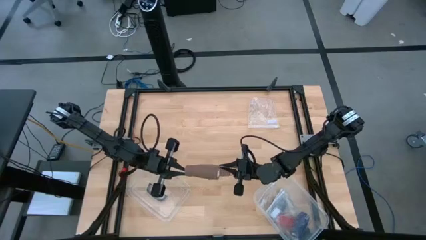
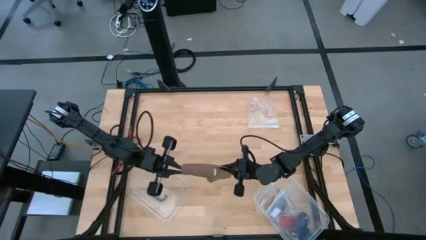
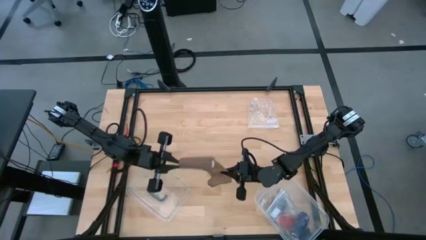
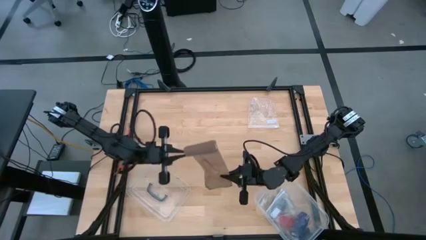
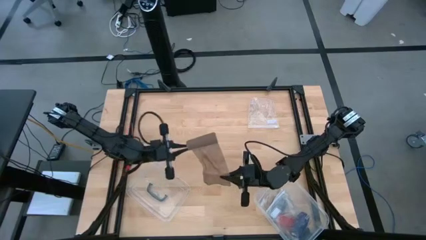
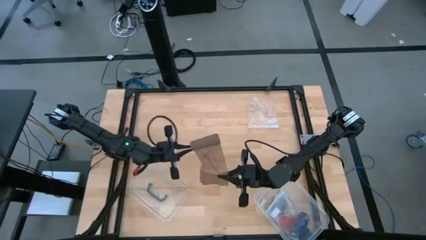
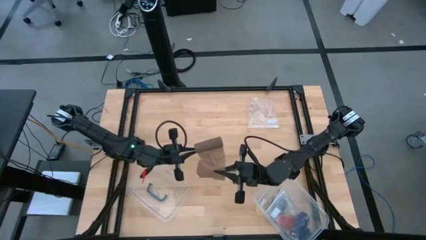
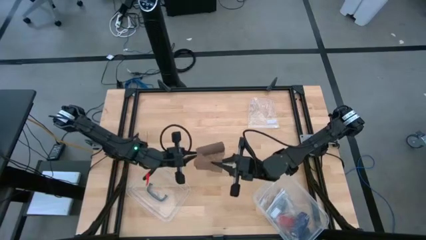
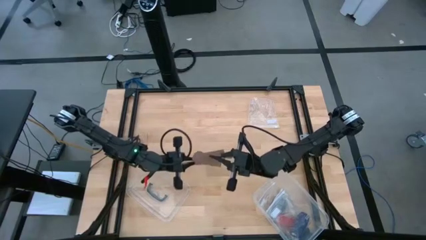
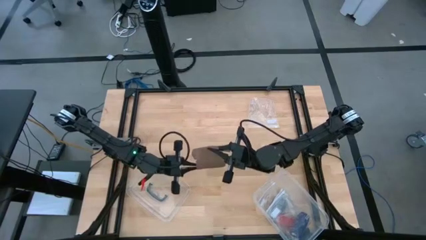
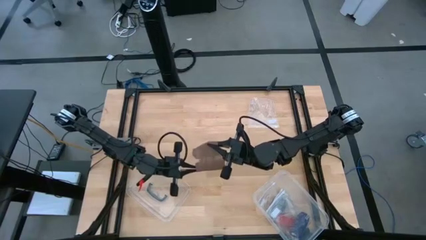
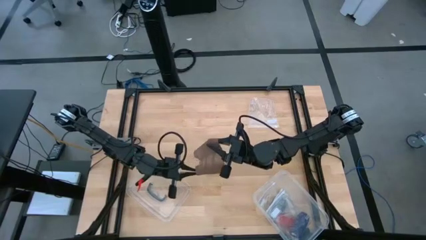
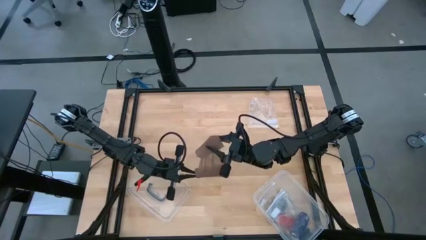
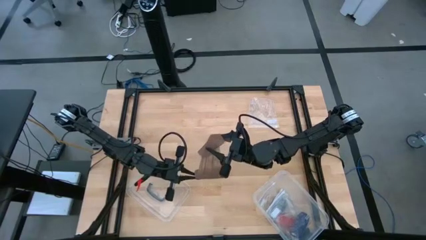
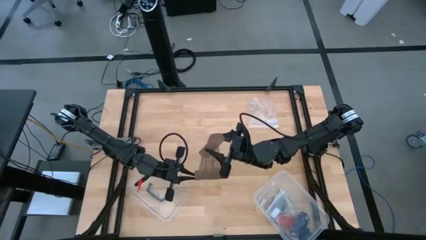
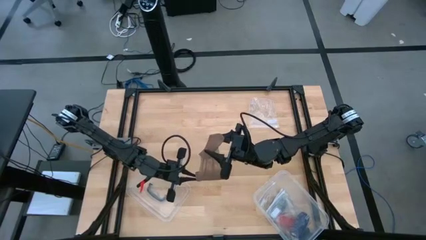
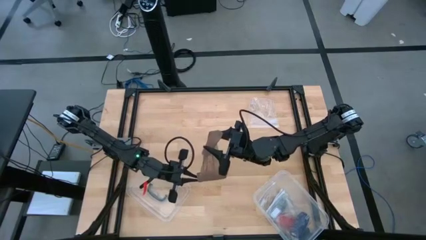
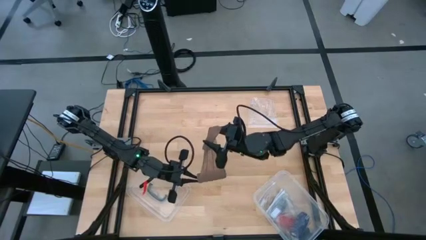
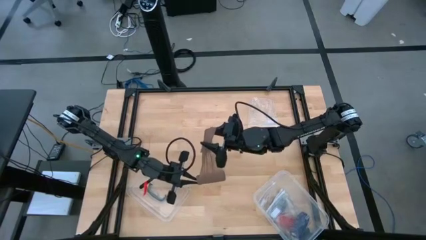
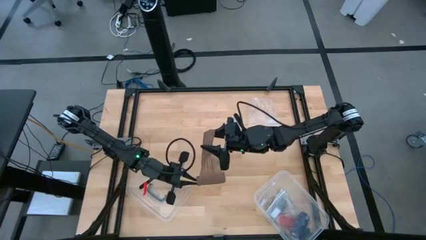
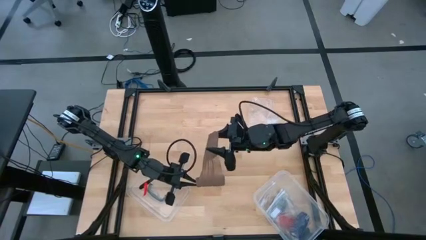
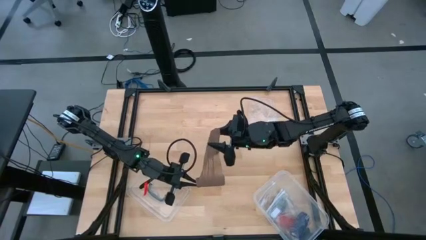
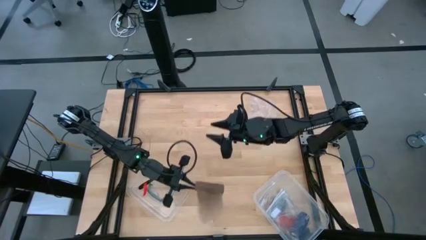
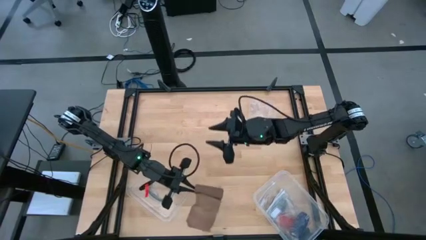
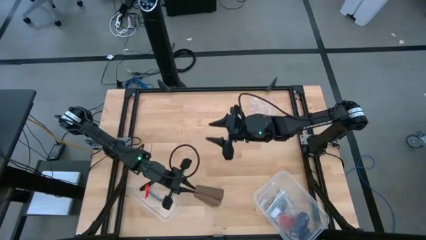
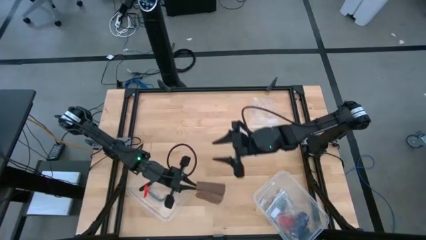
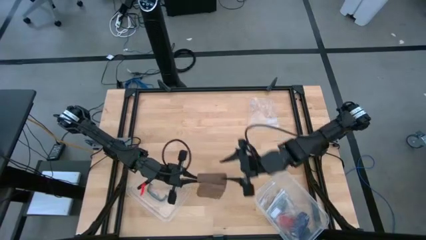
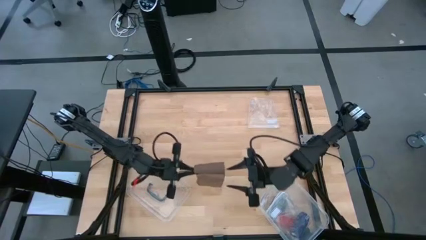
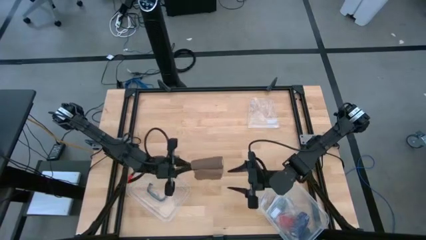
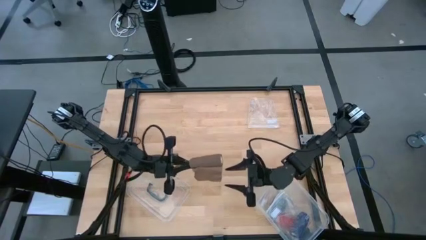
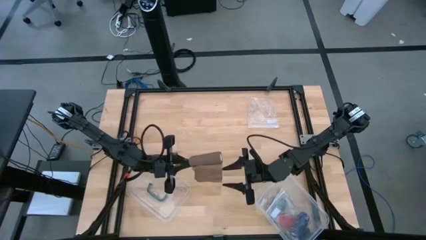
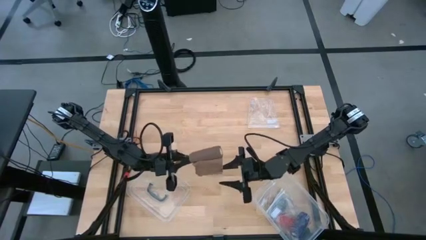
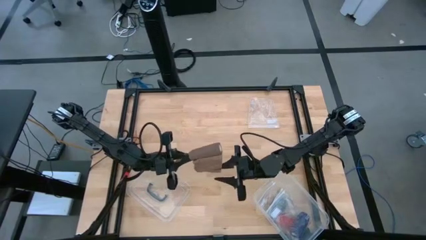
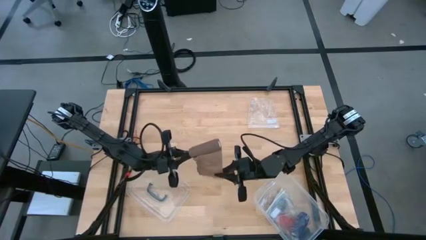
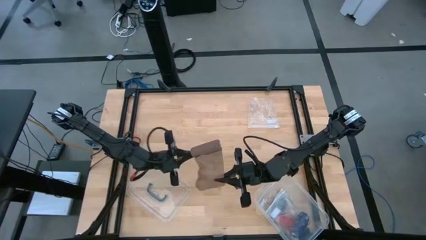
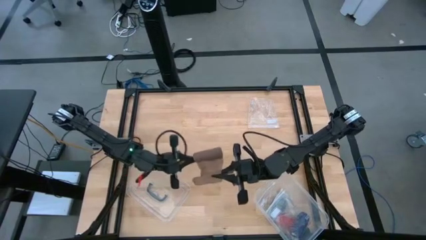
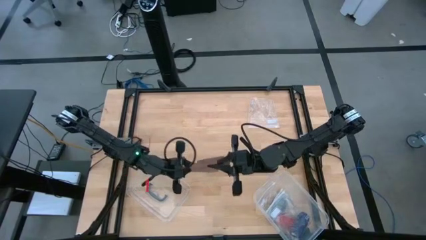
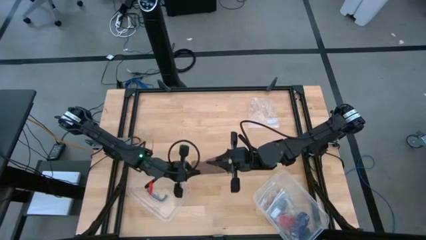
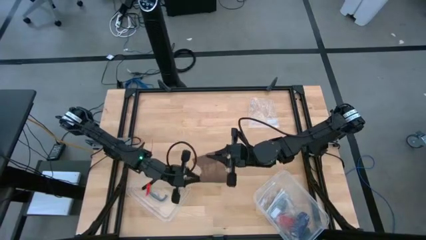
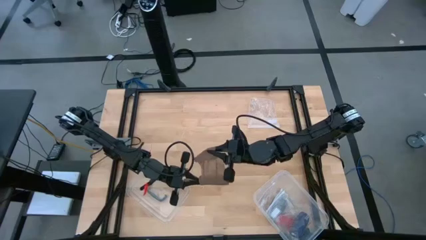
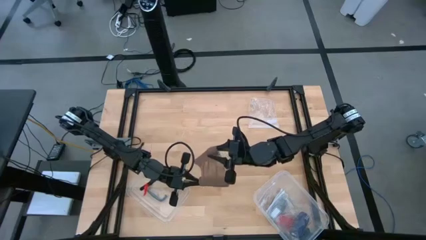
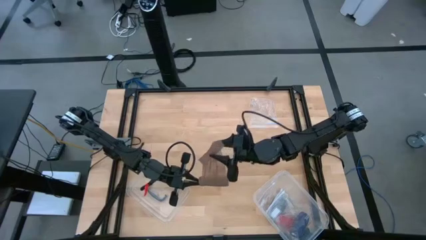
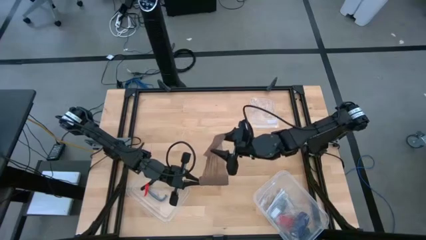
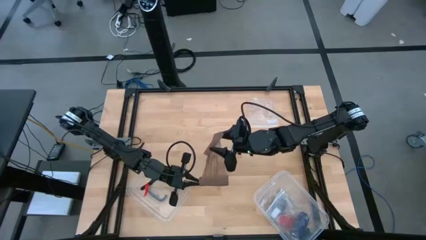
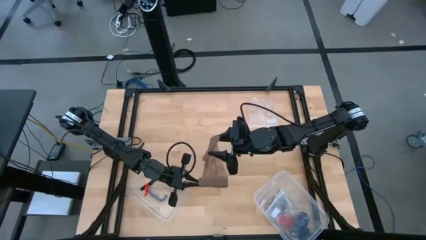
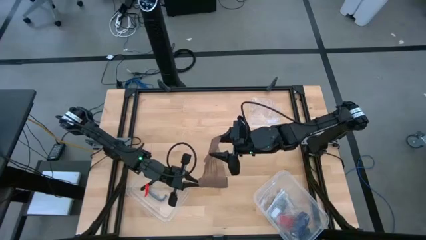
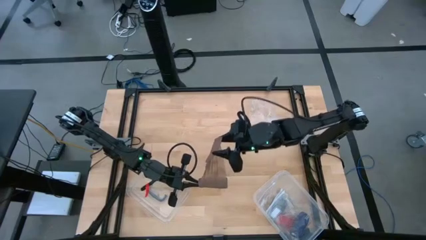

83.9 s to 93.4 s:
Task: Roll bandage
Roll the brown bandage

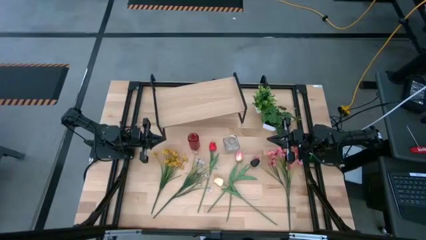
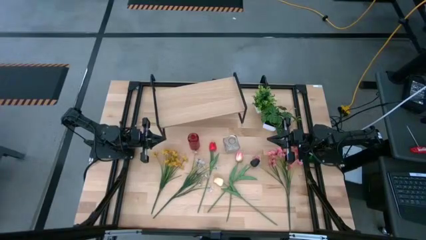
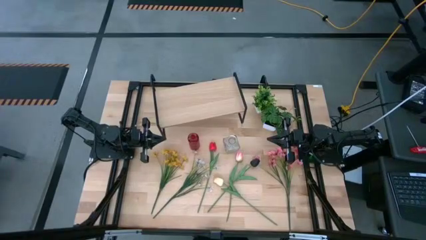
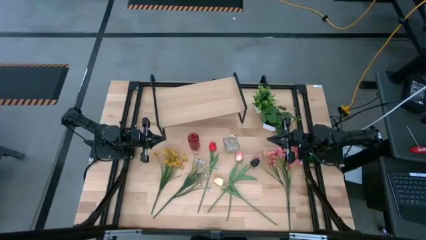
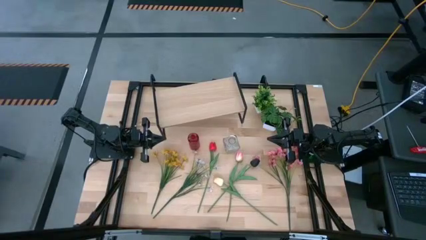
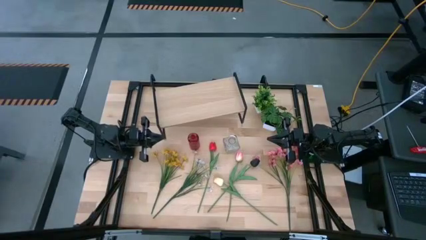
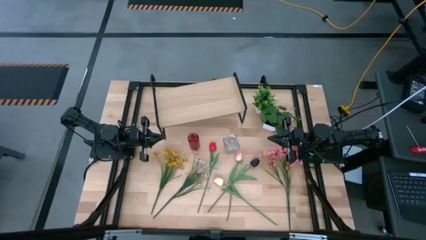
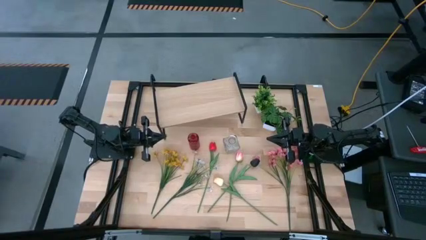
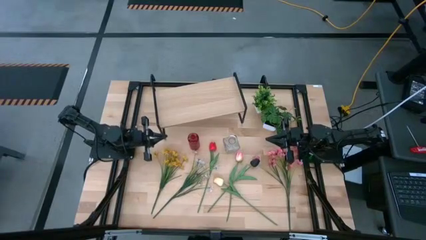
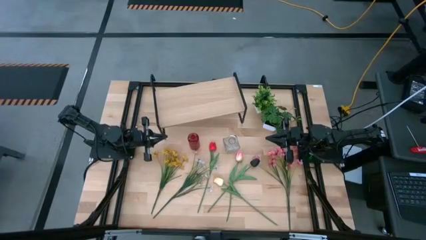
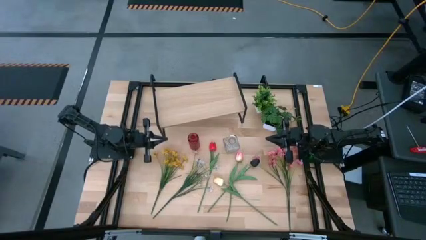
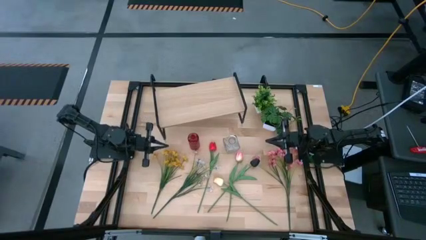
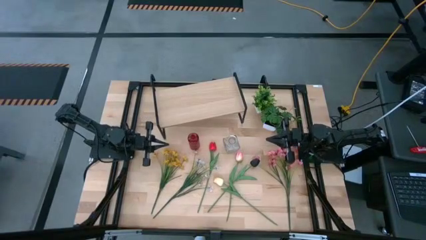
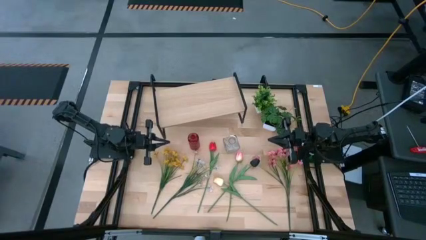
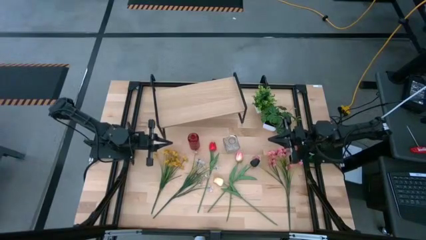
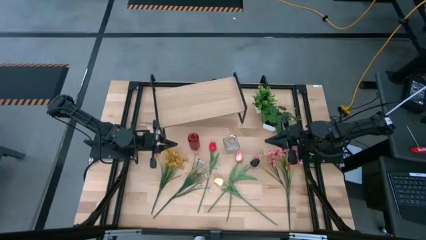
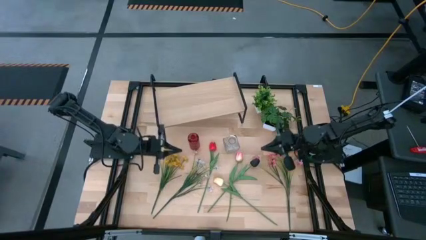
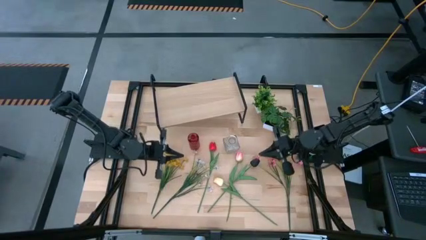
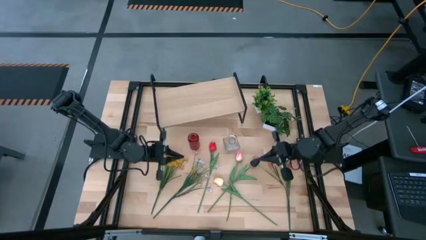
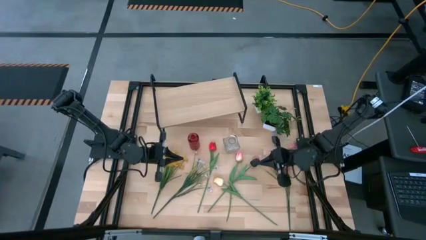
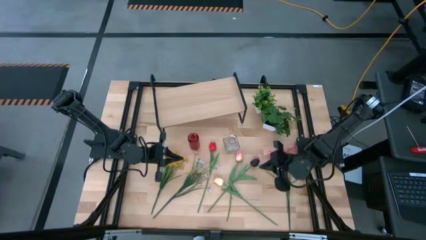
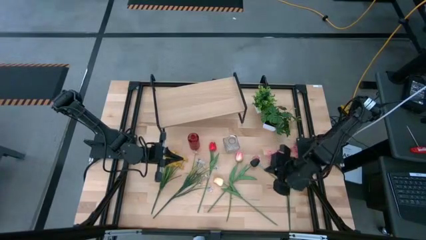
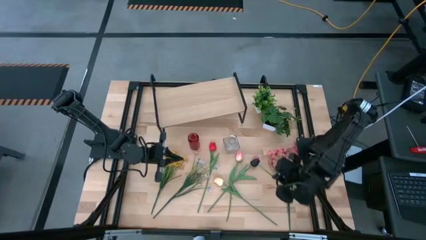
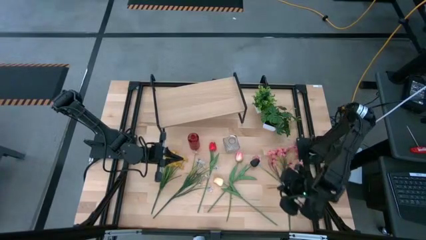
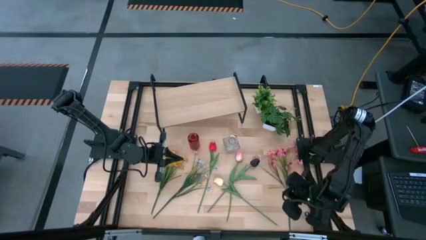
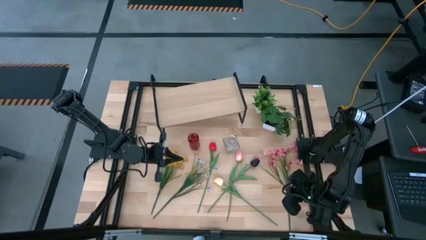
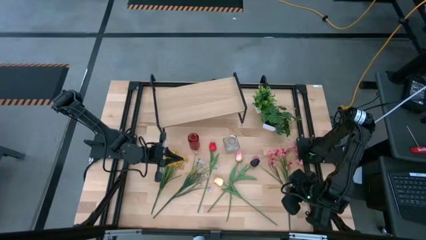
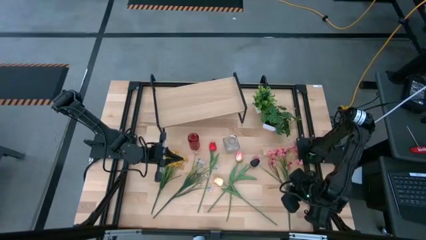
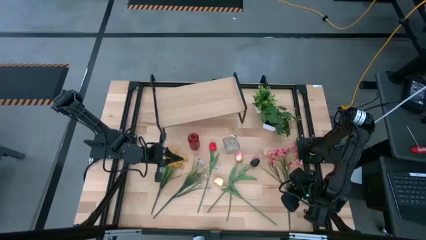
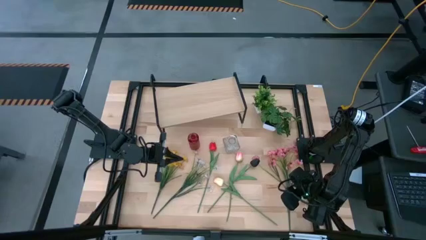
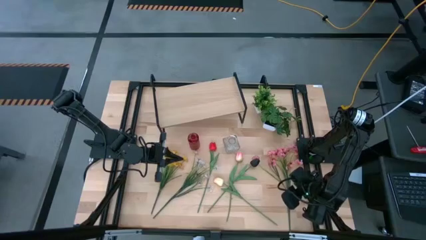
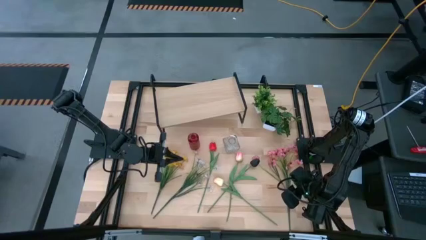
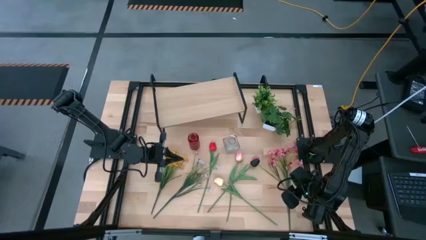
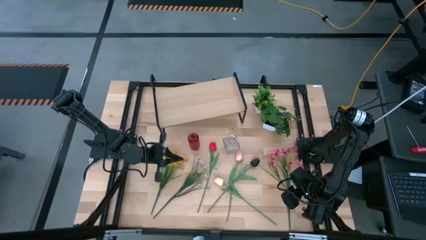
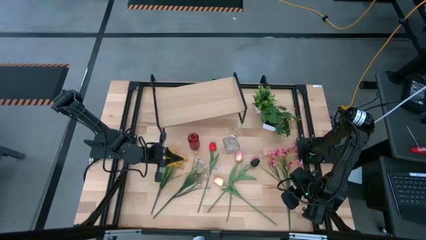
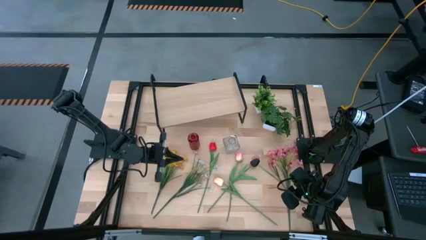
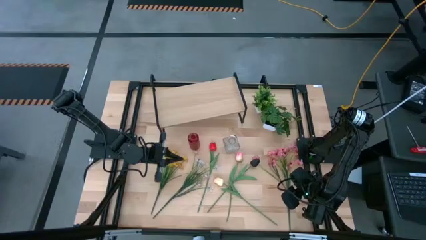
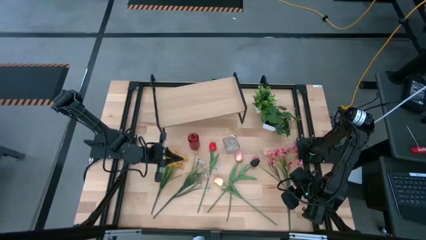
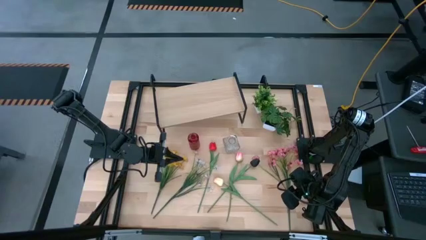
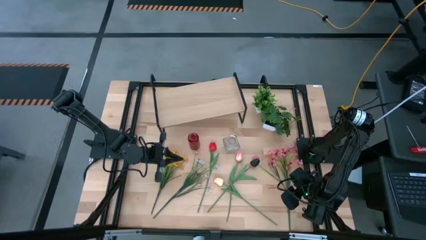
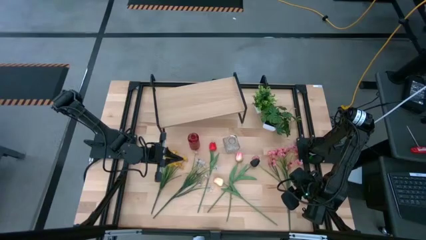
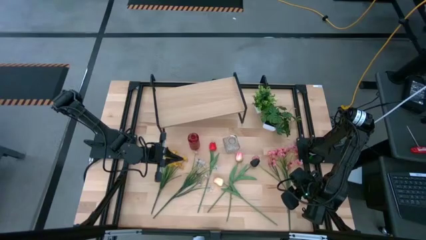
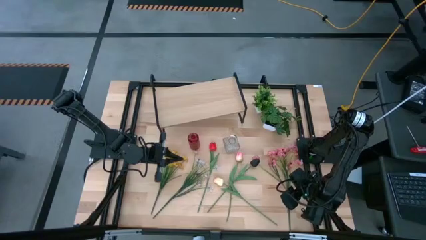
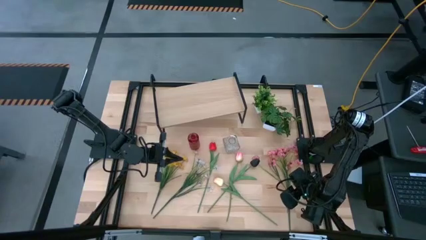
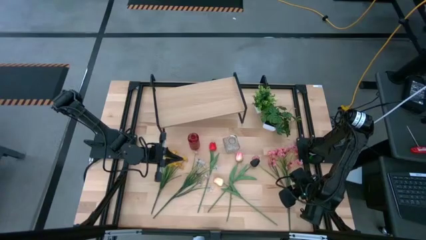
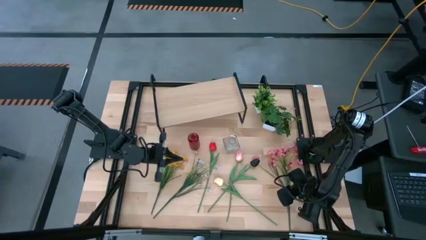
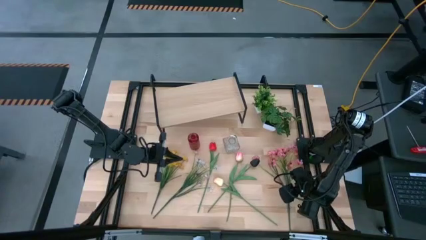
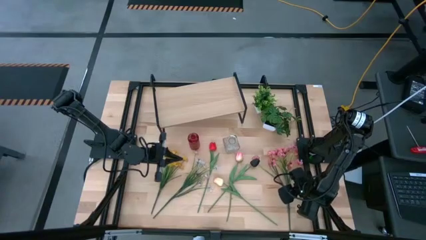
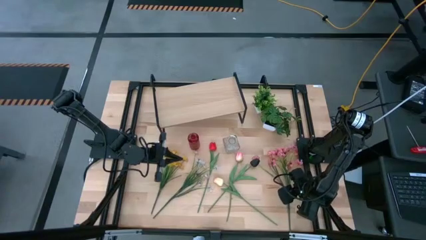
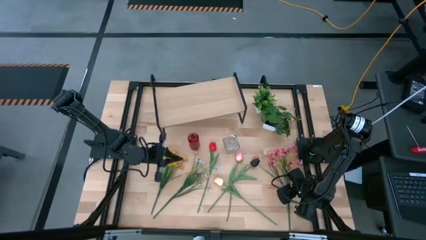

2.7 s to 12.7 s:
Task: Pick and place flowers into a vace then onto a shelf
Put the pink flowers into the transparent vase
